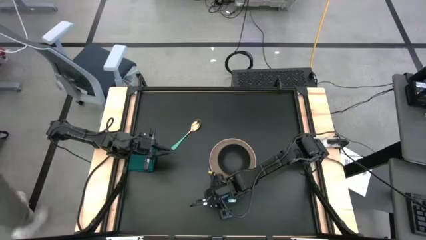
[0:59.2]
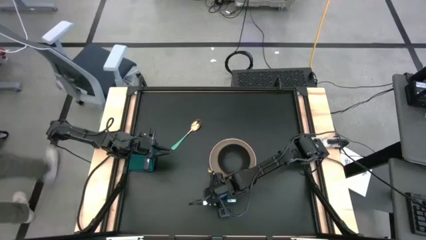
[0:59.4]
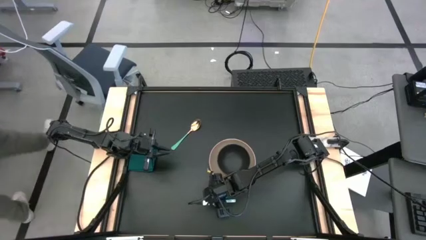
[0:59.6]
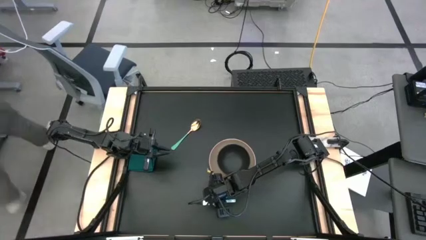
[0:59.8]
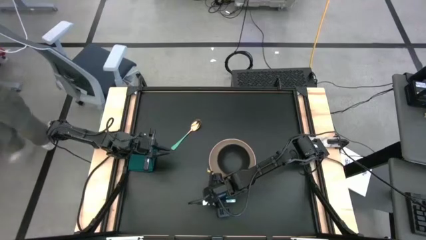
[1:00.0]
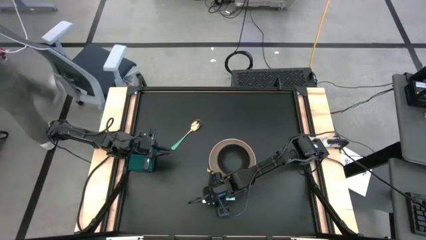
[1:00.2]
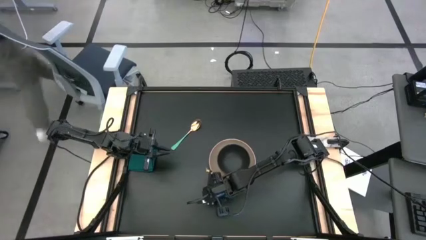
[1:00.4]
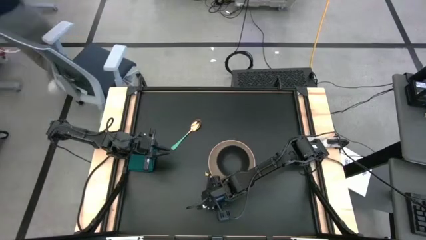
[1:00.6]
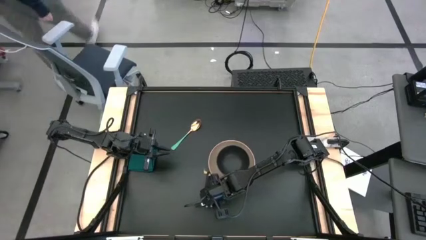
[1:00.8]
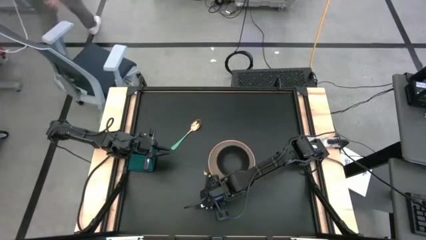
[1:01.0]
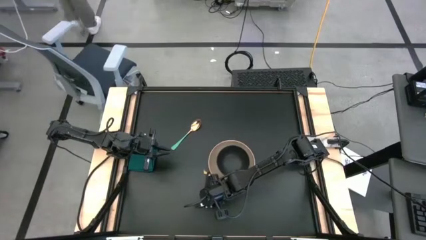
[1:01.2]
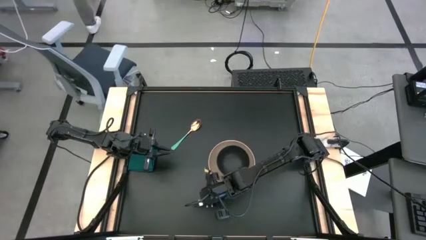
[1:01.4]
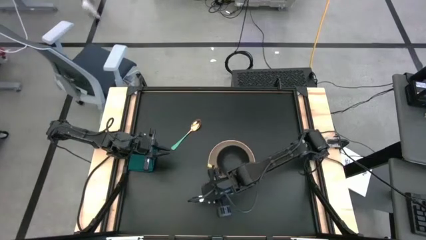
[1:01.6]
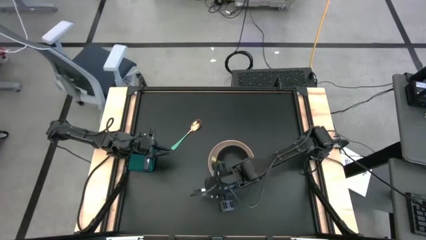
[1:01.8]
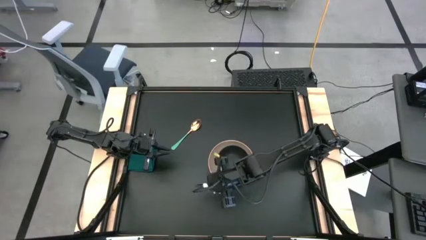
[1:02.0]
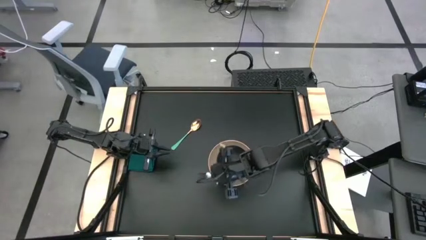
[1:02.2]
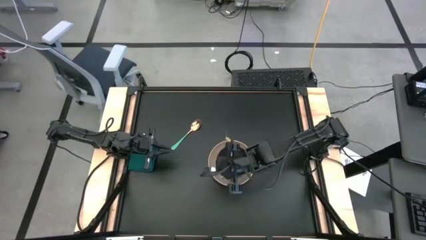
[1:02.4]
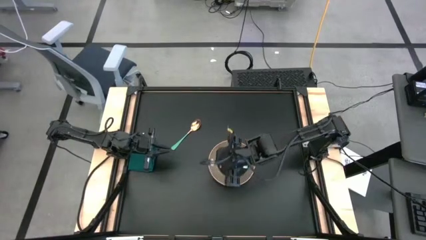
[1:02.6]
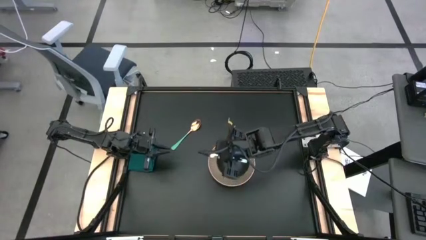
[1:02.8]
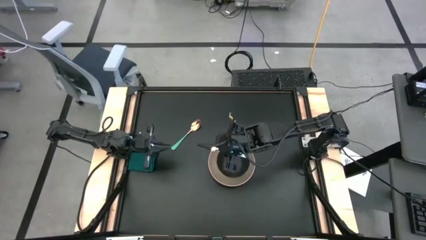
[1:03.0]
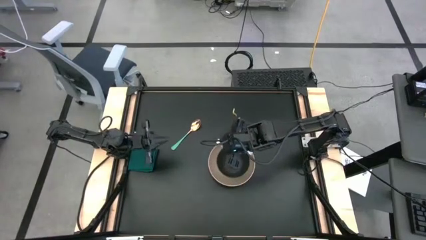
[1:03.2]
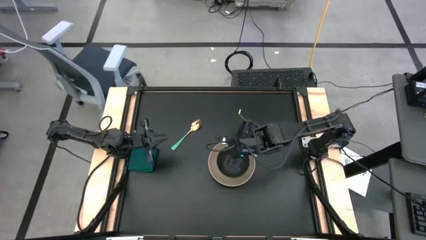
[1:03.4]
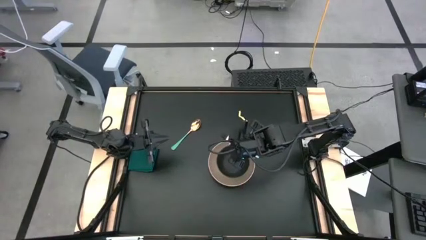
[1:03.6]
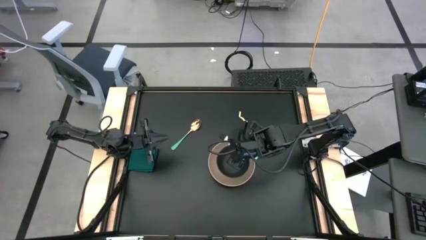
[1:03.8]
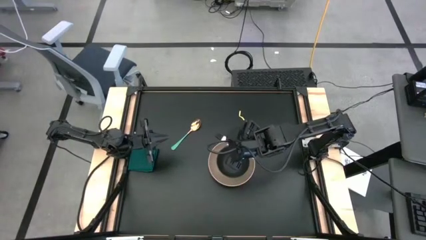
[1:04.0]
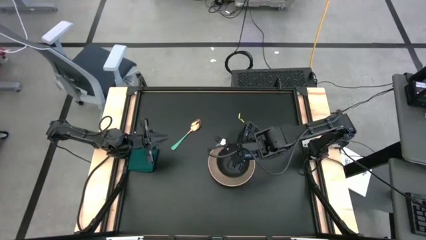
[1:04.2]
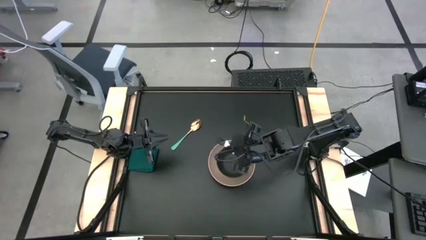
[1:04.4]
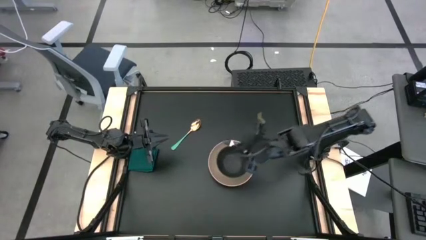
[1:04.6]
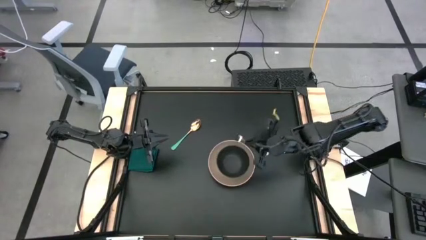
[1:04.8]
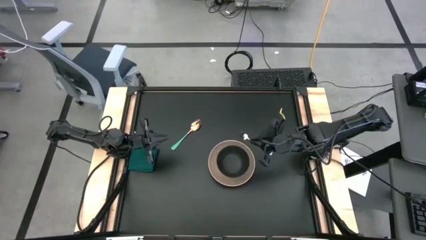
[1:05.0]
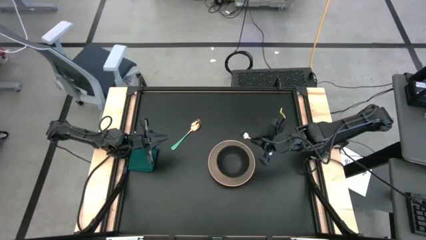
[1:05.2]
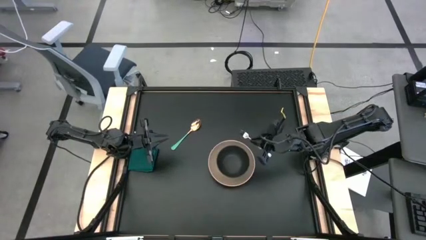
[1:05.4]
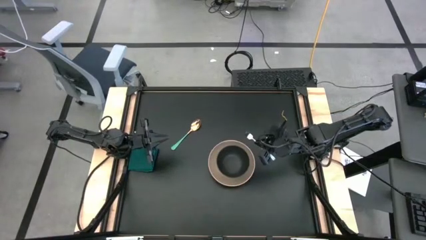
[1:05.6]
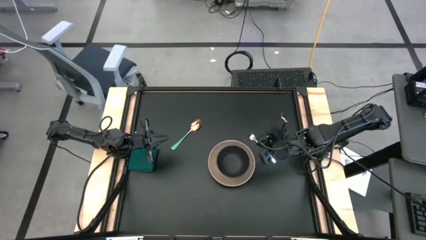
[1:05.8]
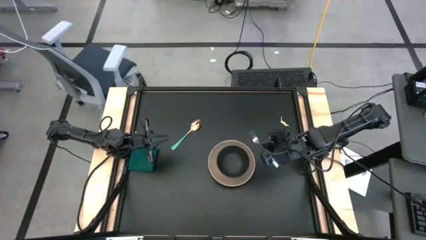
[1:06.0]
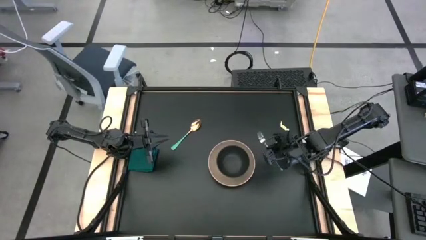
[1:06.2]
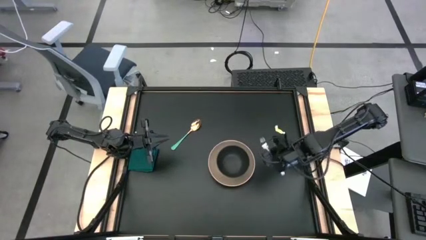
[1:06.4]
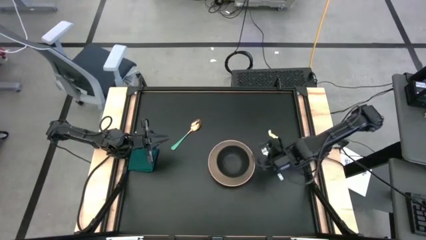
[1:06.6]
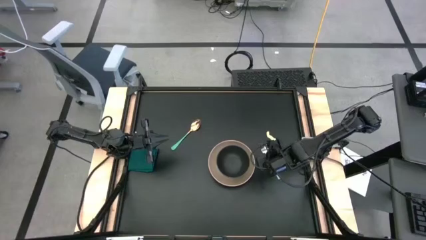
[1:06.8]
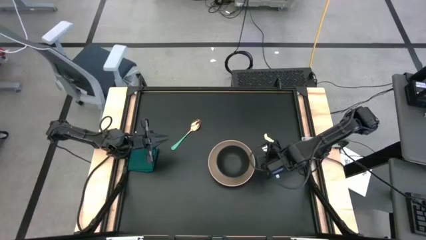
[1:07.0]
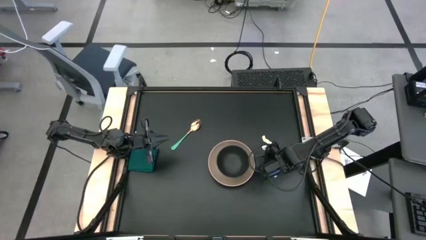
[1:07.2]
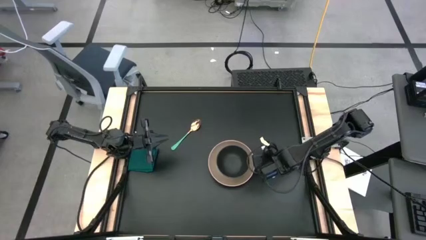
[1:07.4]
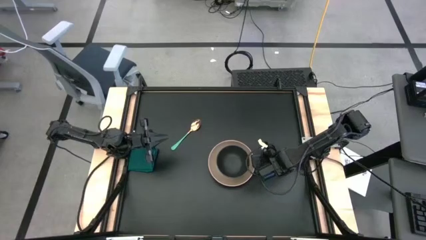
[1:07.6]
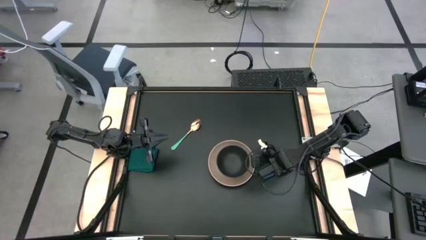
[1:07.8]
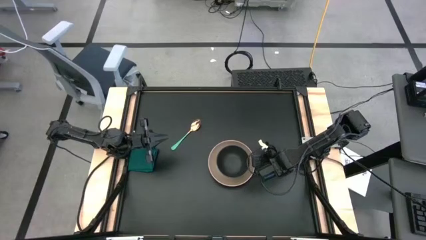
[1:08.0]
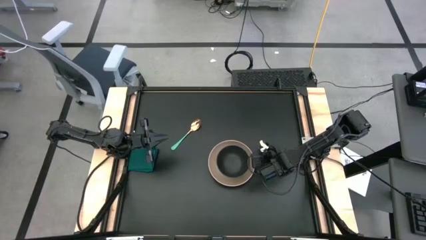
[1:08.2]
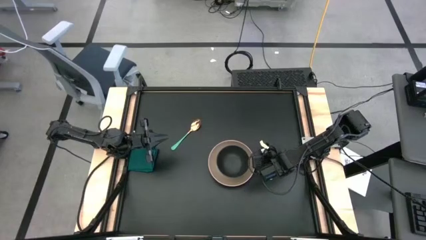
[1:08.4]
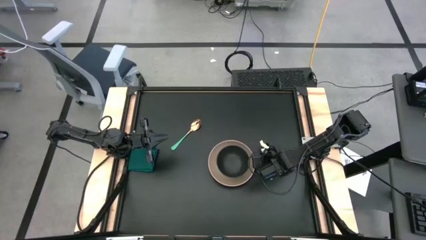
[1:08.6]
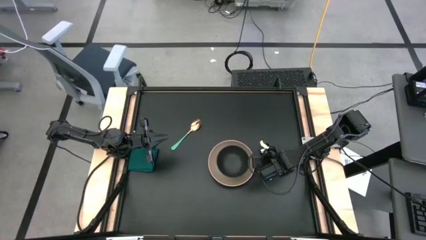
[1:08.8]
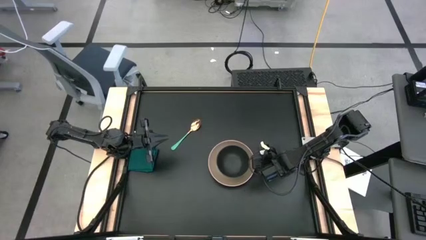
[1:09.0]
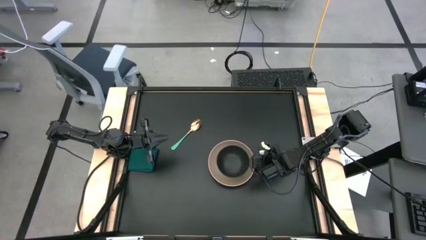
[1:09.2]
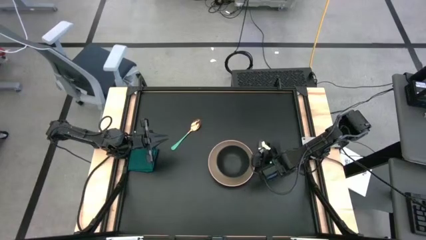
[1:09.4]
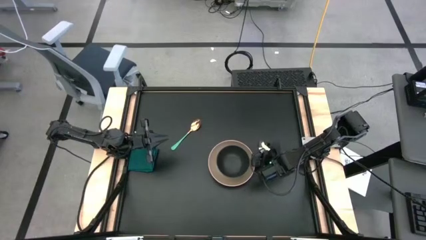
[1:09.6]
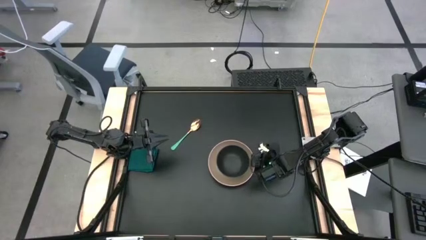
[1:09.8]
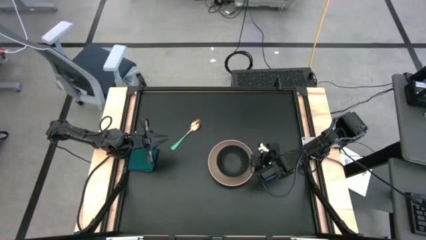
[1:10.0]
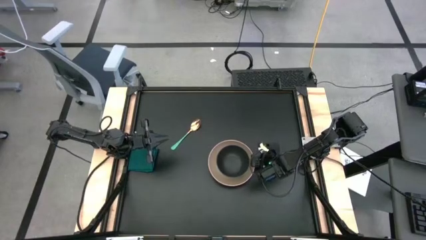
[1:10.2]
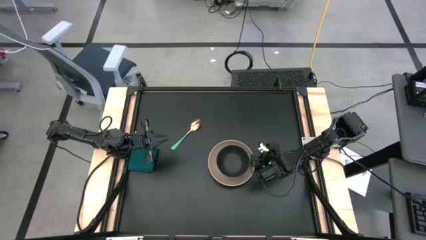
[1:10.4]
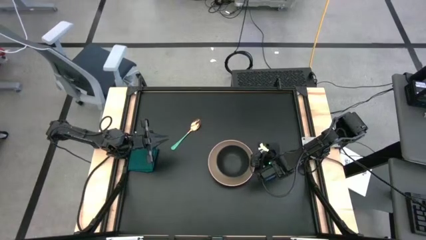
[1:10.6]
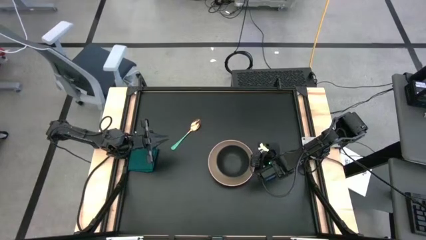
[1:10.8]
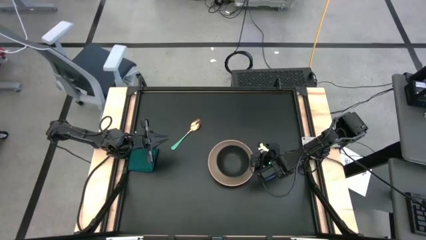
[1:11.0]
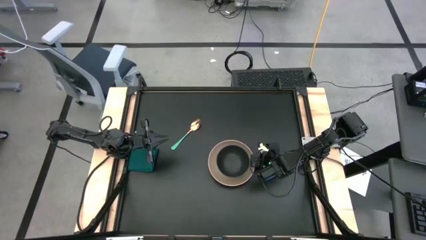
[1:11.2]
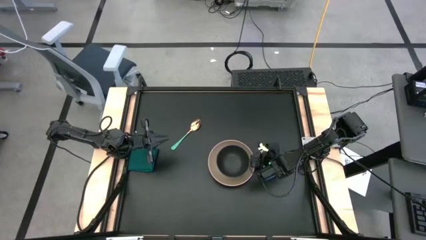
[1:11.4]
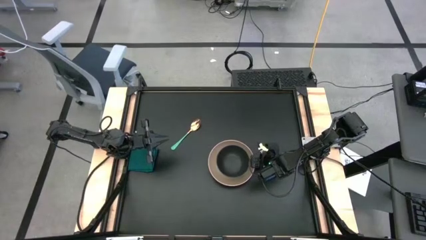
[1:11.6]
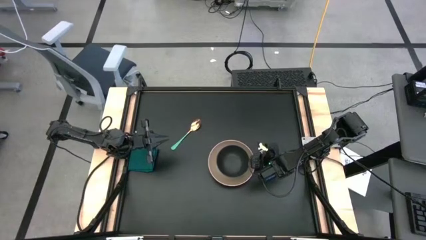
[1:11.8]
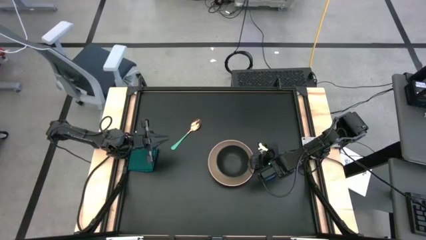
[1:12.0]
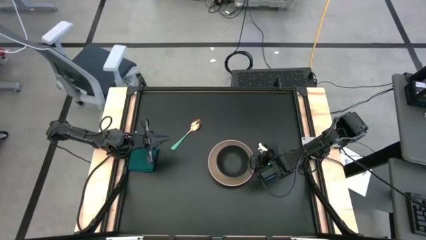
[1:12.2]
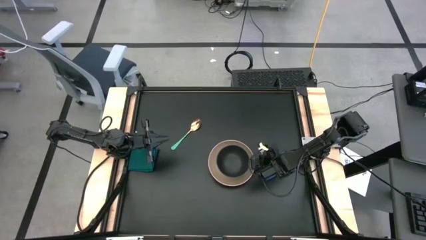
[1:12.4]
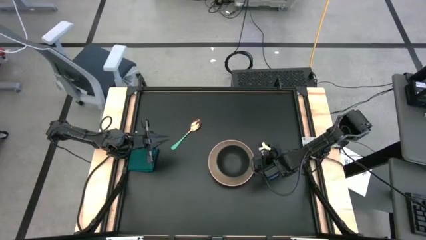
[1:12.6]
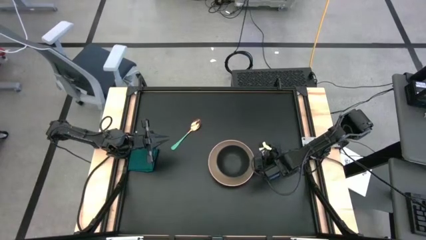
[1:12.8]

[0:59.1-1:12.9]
Task: Set table place
Put the fork to the right of the plate

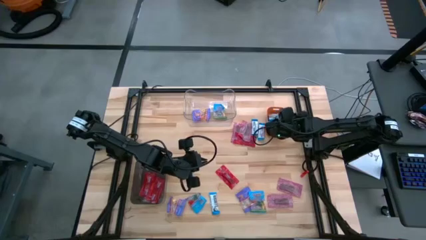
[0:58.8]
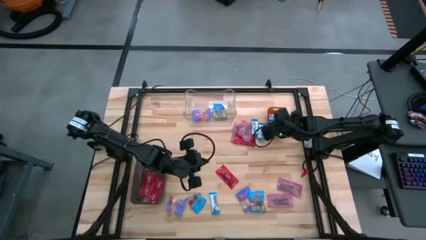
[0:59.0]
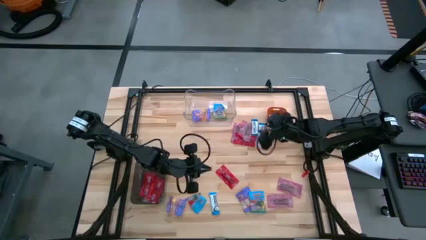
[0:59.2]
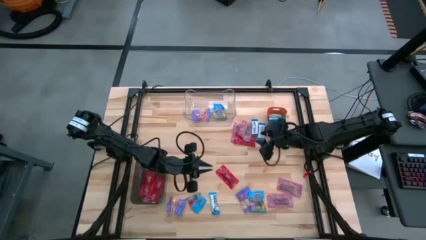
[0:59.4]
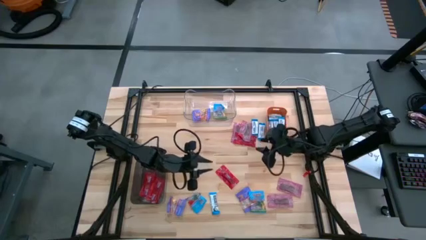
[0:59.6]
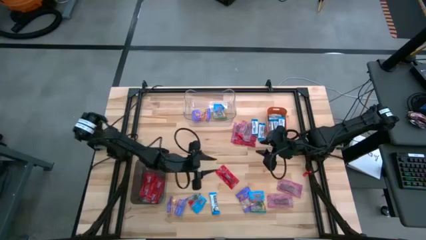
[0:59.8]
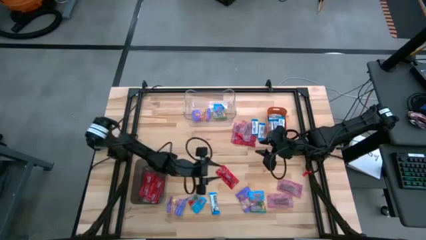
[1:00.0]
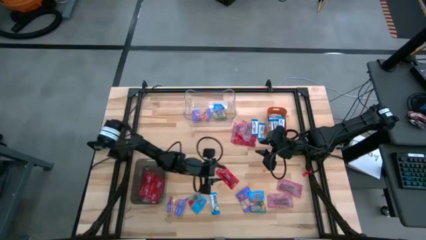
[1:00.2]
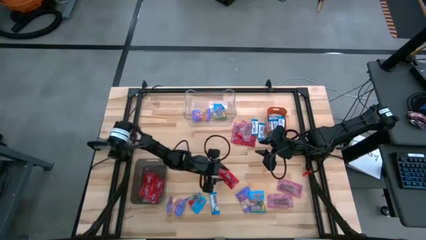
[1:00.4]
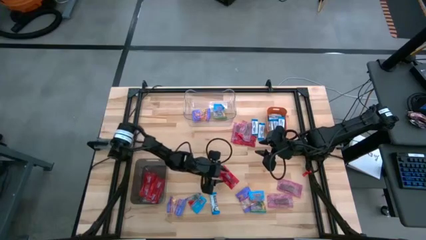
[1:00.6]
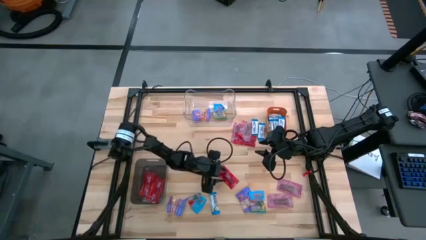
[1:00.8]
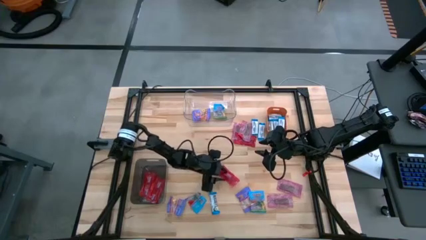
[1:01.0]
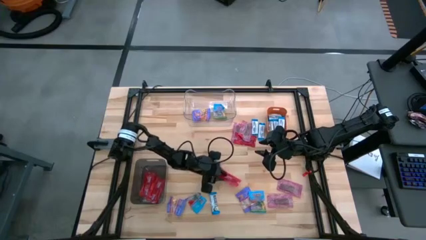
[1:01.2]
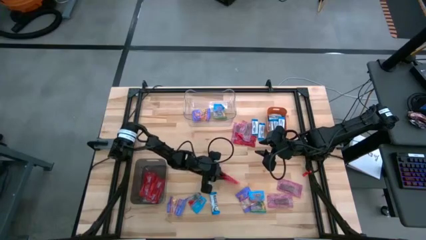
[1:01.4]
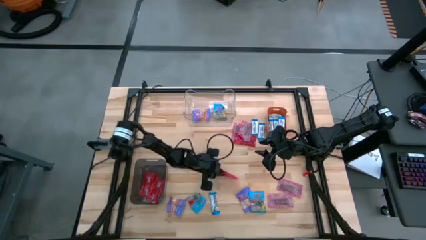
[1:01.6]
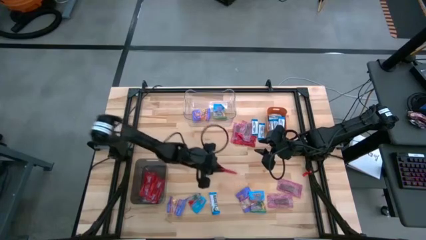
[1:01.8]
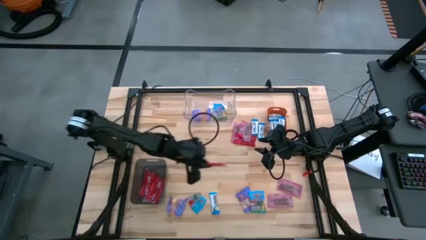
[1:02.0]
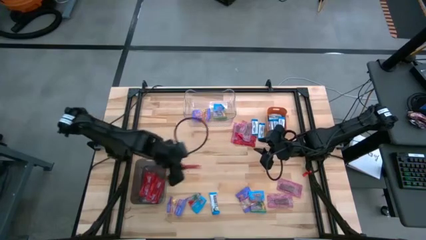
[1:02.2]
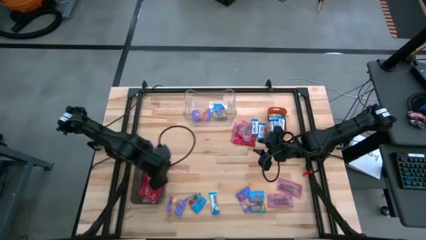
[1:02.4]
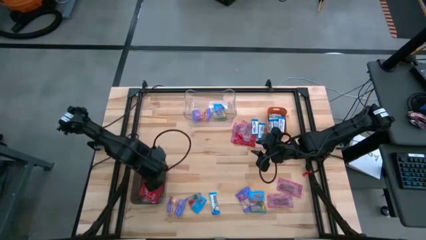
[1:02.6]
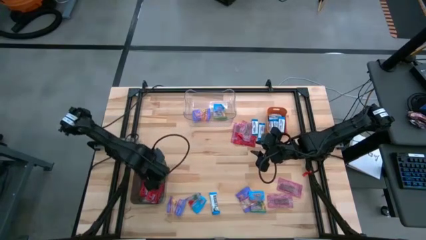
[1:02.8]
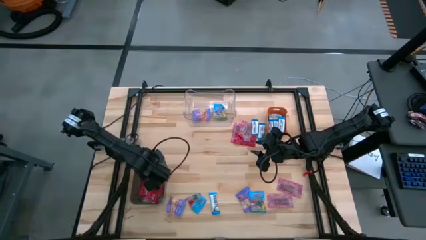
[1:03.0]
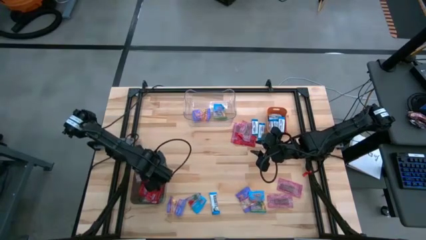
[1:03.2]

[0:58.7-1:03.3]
Task: Sort candy
Put the red candy into the black bin
